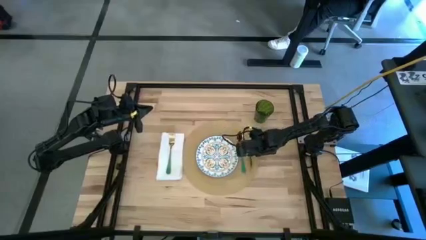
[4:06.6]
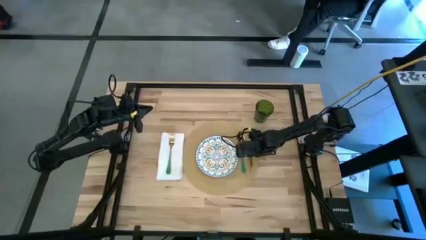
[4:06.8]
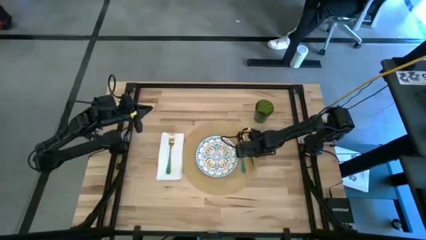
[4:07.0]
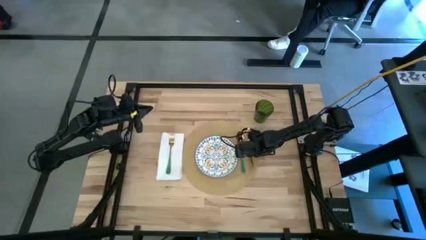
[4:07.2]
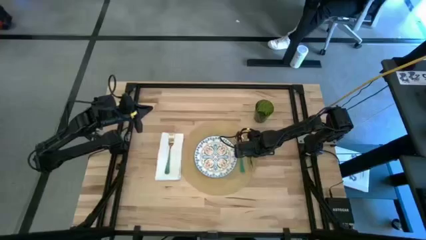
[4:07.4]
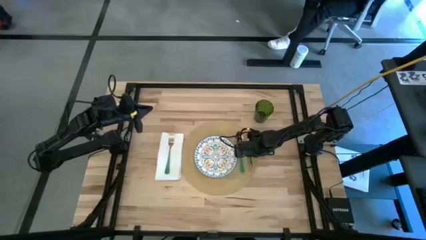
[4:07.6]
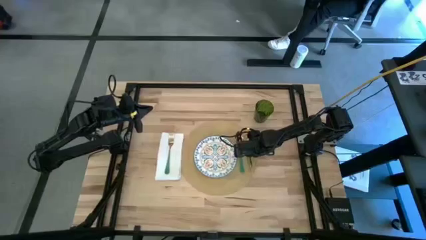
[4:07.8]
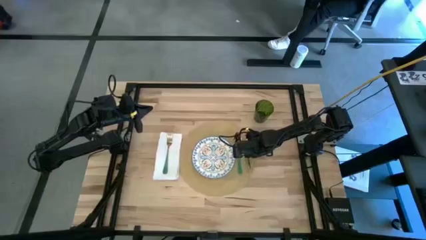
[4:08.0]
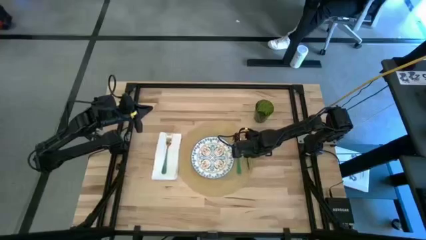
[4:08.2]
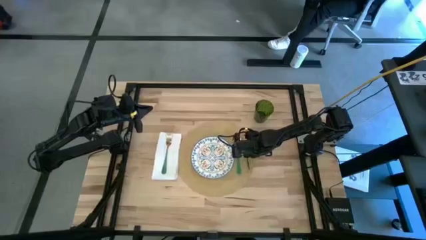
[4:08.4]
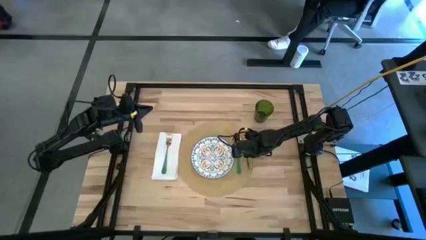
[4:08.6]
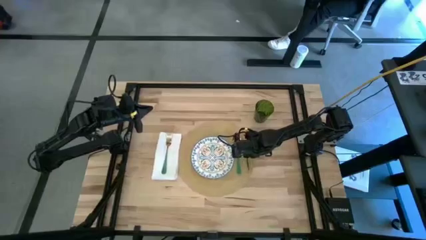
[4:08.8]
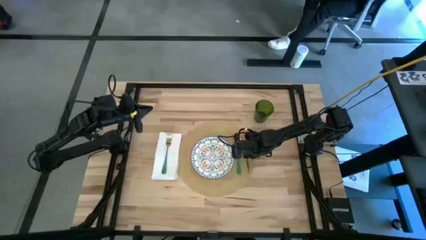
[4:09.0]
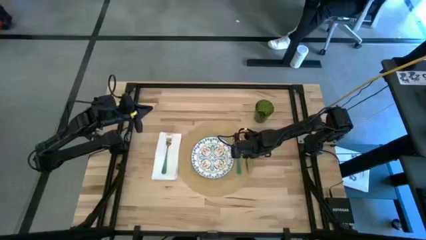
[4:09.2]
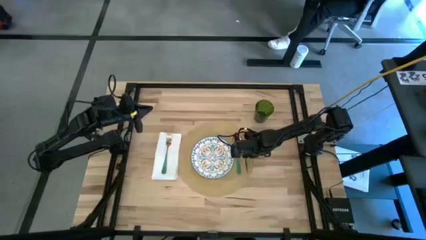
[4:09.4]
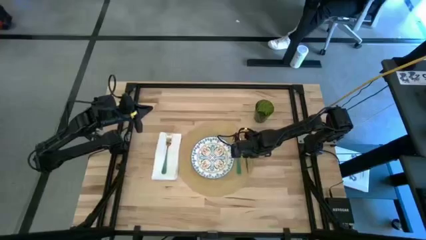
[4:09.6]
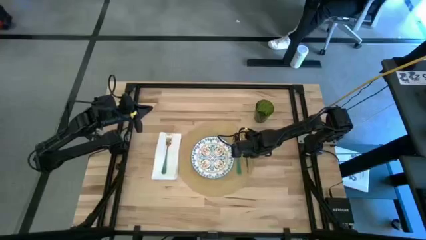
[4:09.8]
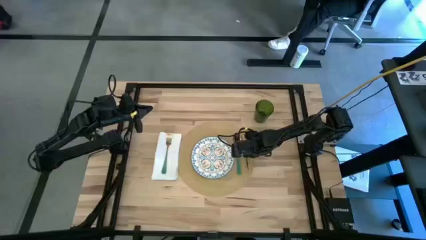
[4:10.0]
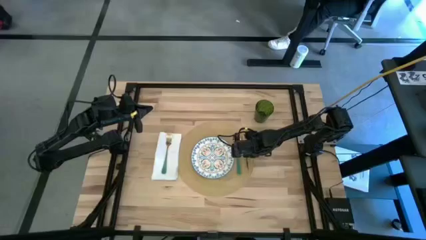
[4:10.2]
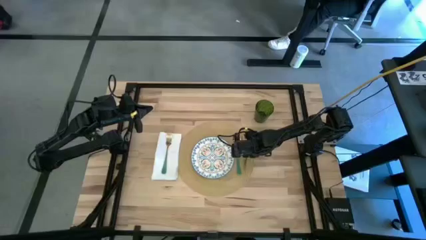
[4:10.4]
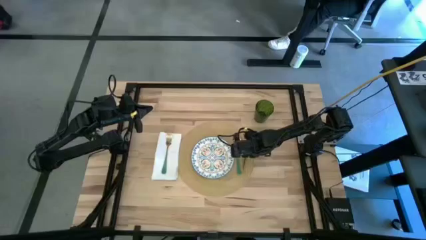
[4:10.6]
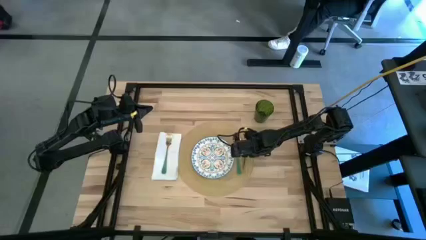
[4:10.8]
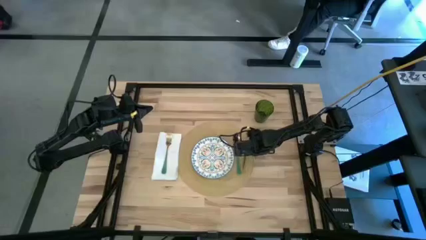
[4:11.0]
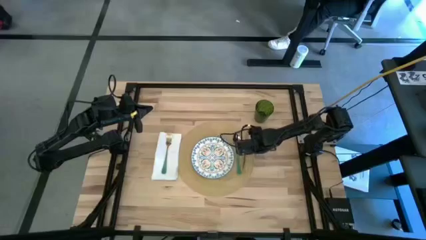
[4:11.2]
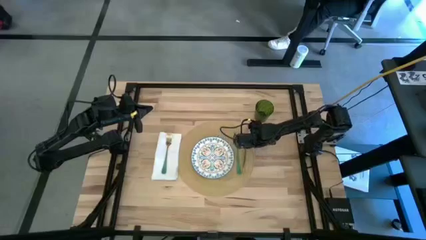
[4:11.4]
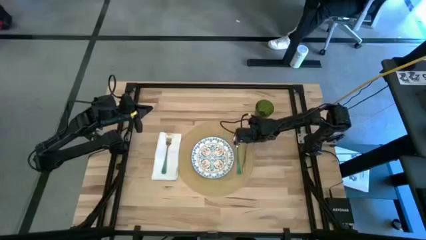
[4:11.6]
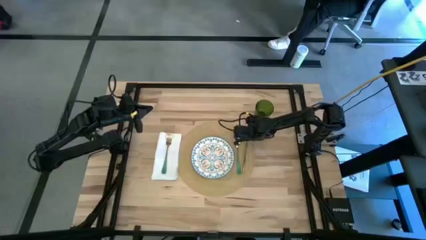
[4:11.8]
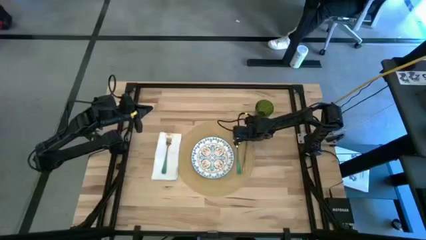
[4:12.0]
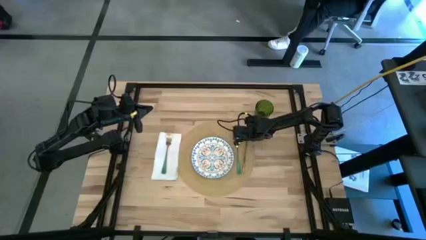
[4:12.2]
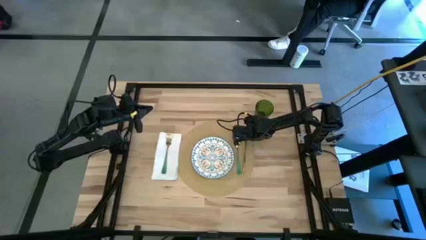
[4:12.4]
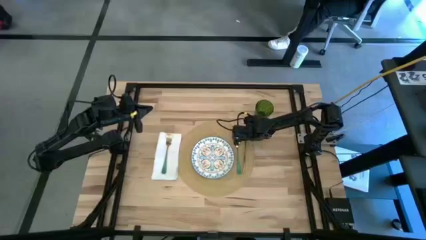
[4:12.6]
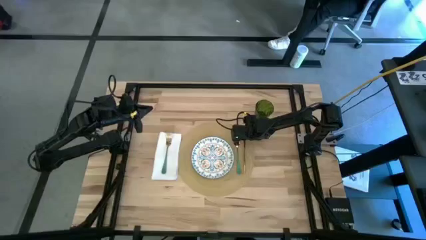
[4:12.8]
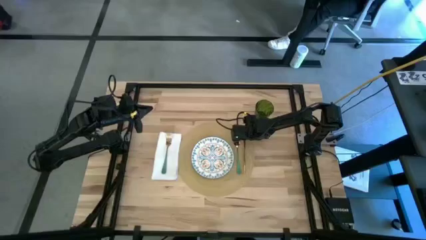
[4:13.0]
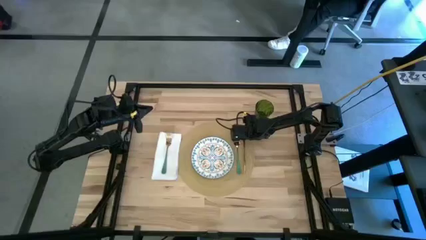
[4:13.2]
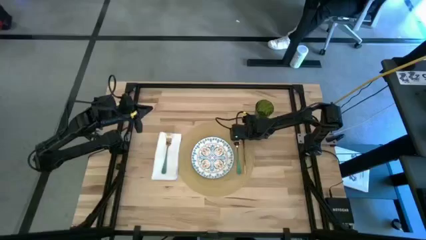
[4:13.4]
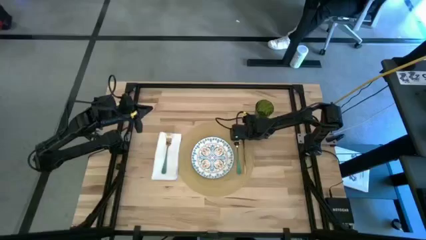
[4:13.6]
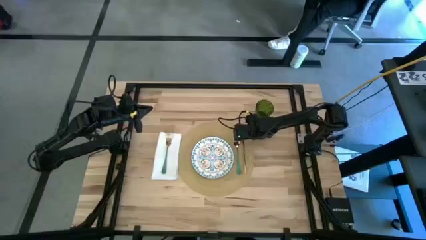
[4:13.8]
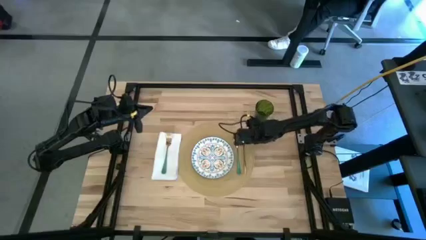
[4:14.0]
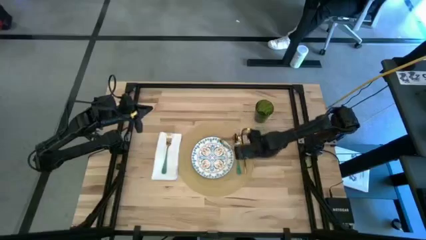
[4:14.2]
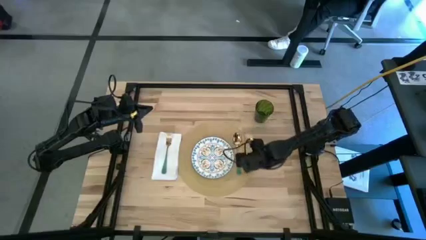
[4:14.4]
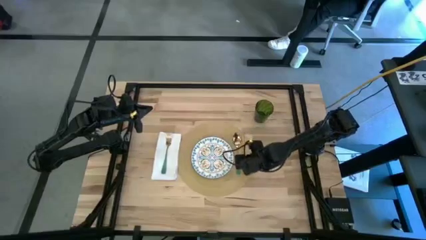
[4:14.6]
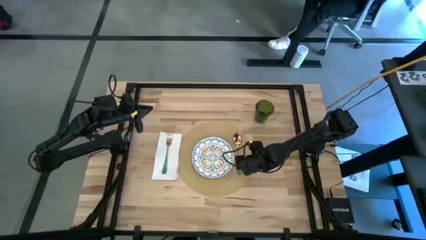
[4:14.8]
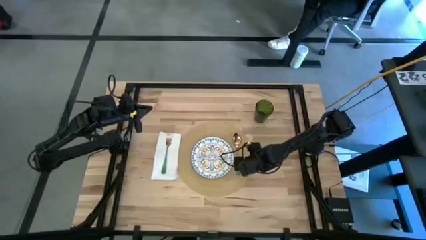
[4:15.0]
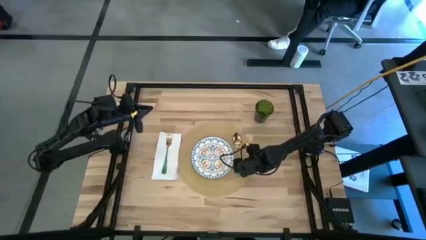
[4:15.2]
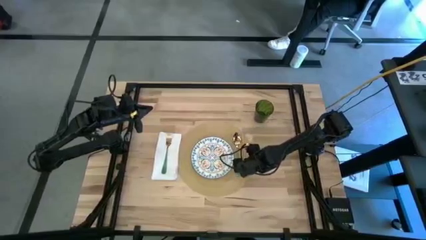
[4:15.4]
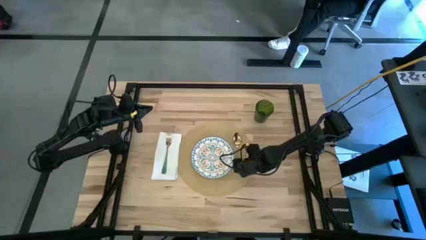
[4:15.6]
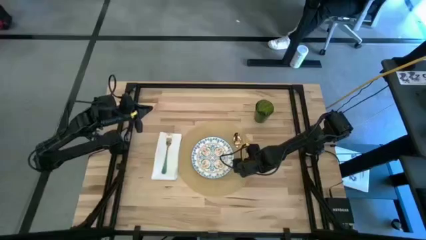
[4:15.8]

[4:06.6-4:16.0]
Task: Set table place
Put the gold table knife to the right of the green spoon on the brown place mat

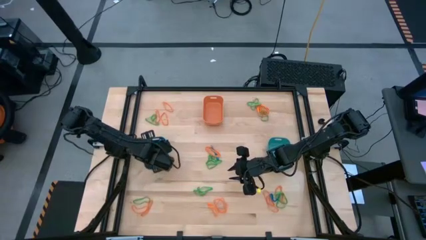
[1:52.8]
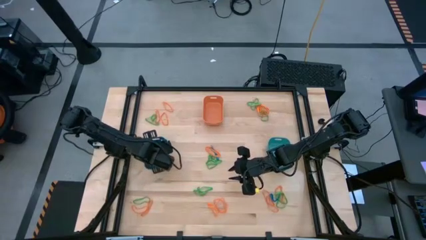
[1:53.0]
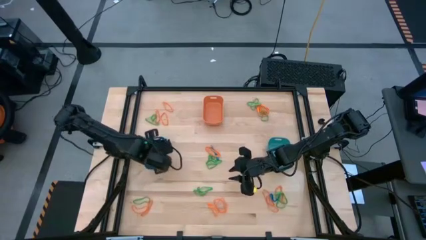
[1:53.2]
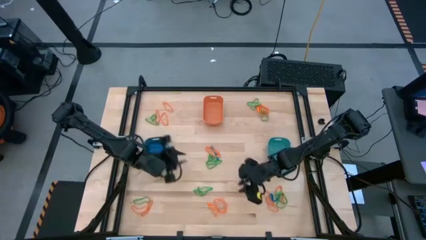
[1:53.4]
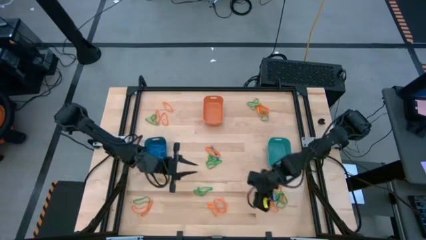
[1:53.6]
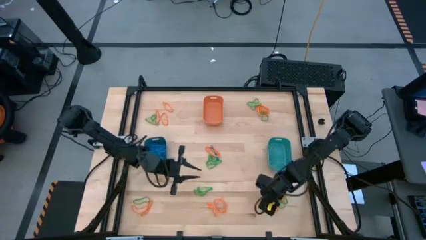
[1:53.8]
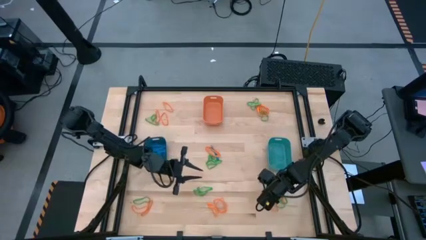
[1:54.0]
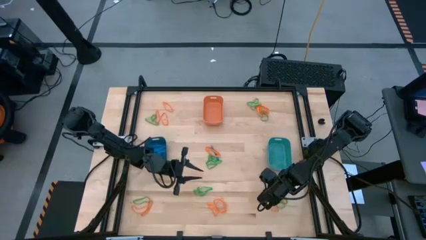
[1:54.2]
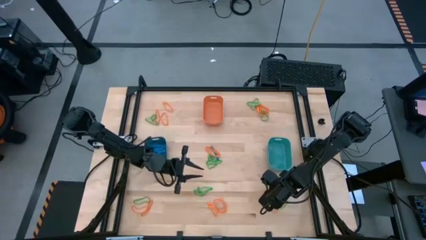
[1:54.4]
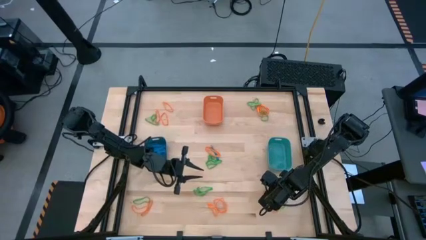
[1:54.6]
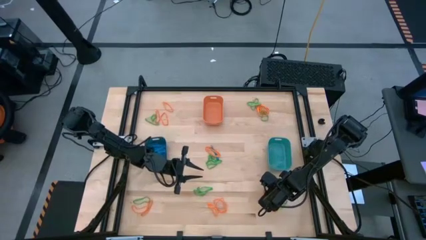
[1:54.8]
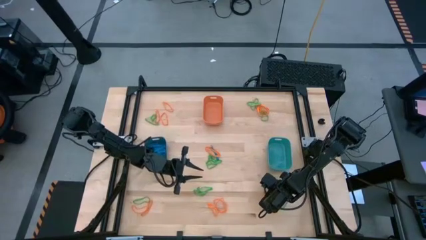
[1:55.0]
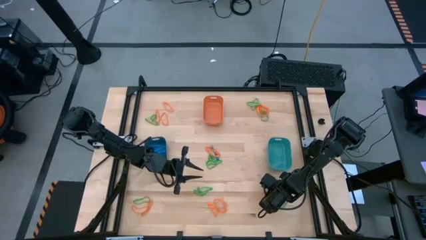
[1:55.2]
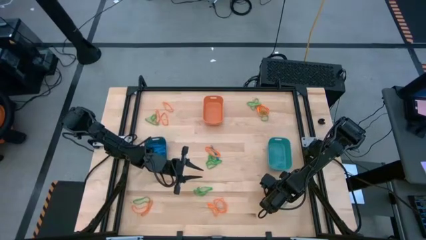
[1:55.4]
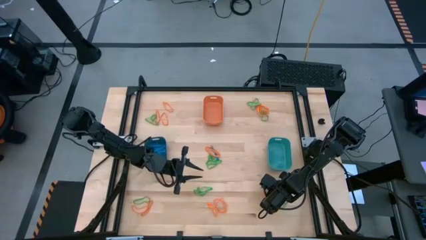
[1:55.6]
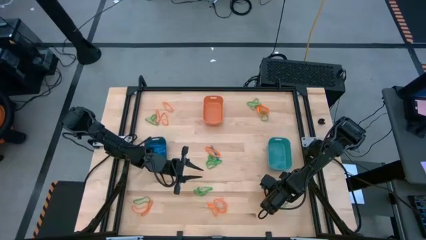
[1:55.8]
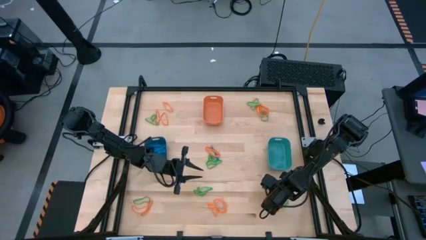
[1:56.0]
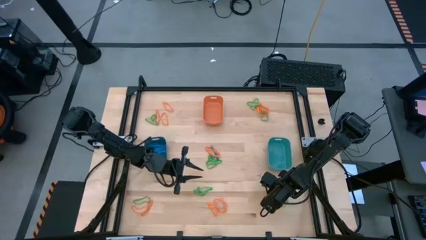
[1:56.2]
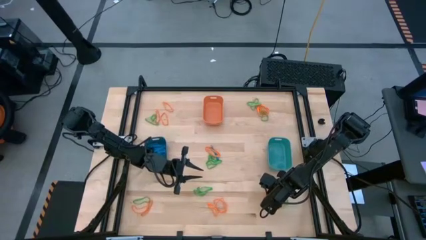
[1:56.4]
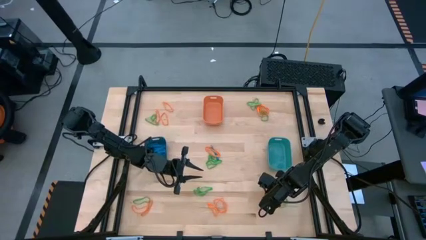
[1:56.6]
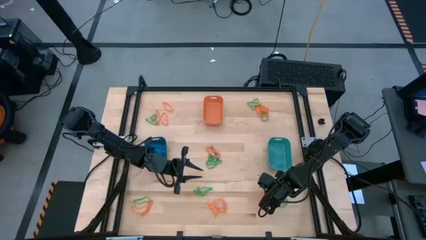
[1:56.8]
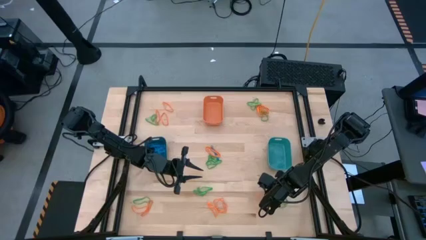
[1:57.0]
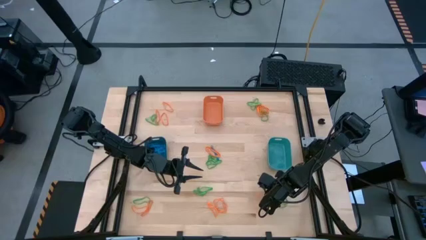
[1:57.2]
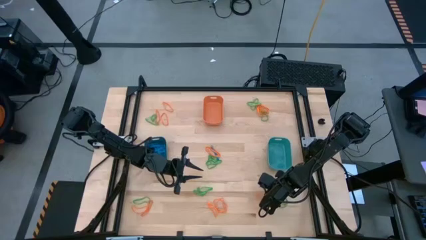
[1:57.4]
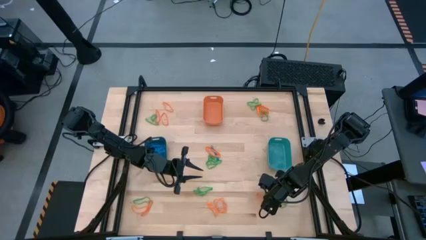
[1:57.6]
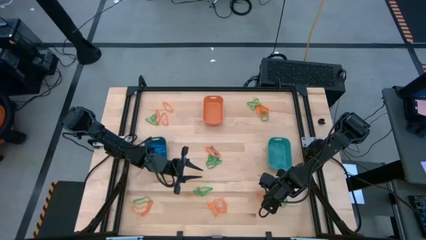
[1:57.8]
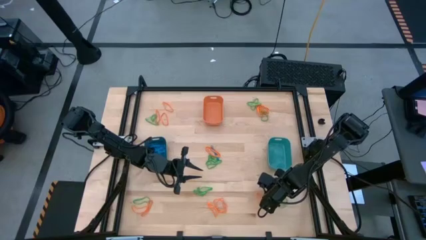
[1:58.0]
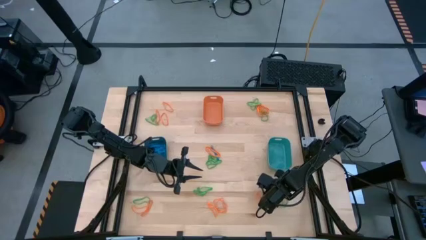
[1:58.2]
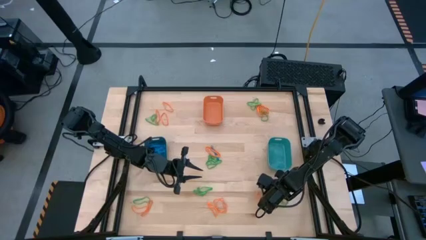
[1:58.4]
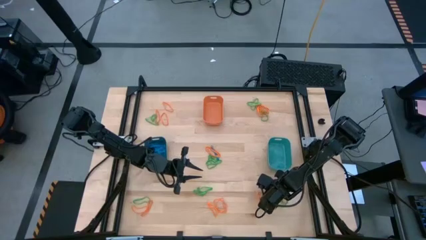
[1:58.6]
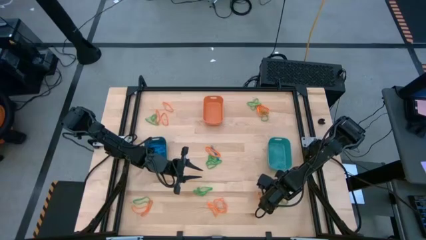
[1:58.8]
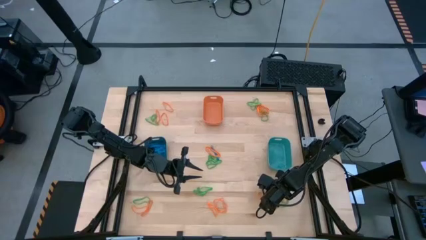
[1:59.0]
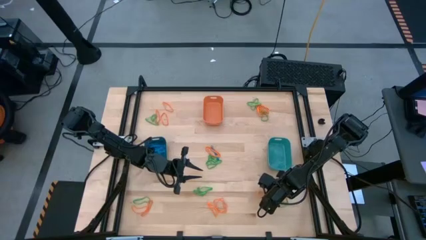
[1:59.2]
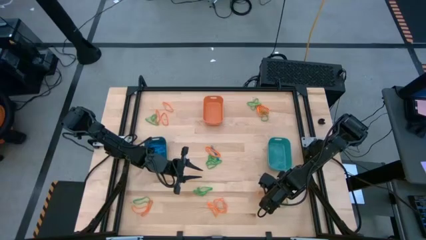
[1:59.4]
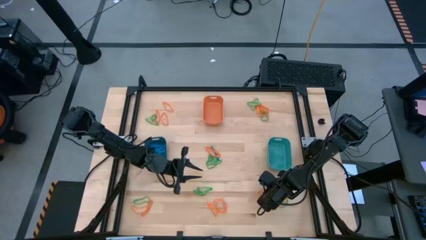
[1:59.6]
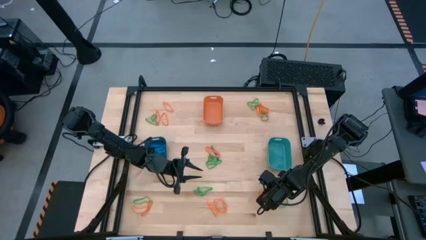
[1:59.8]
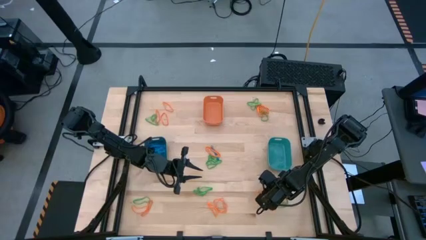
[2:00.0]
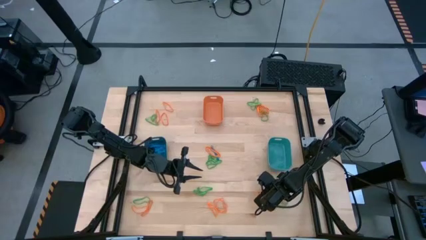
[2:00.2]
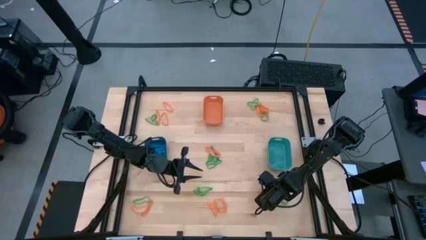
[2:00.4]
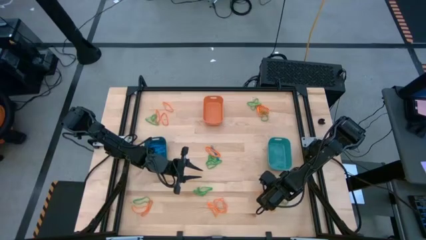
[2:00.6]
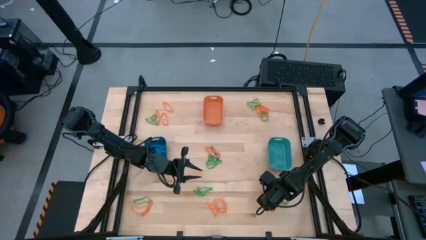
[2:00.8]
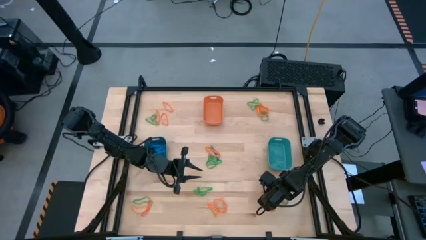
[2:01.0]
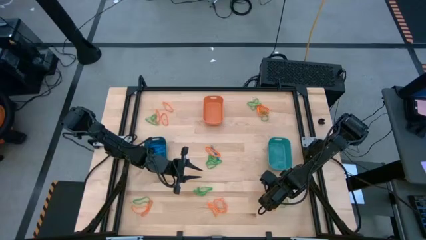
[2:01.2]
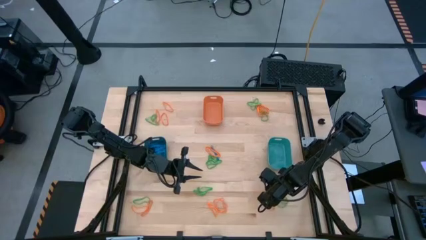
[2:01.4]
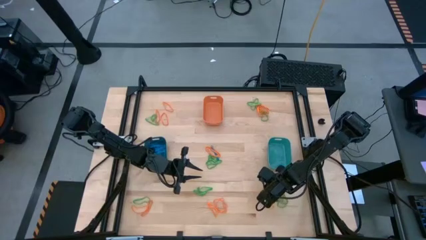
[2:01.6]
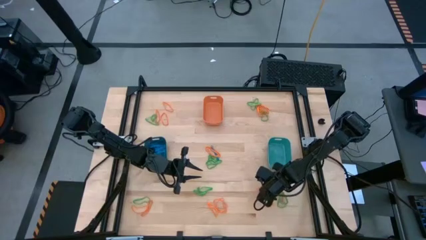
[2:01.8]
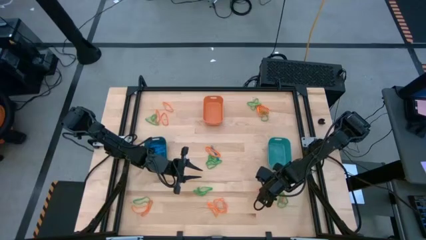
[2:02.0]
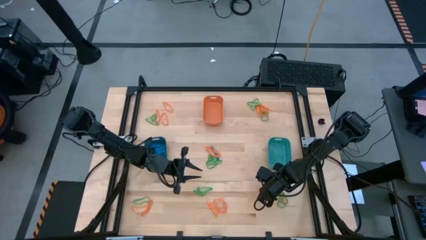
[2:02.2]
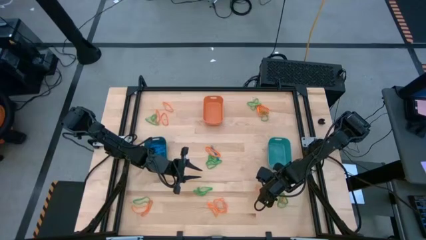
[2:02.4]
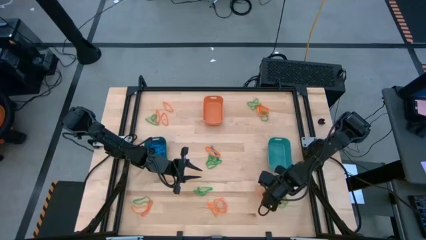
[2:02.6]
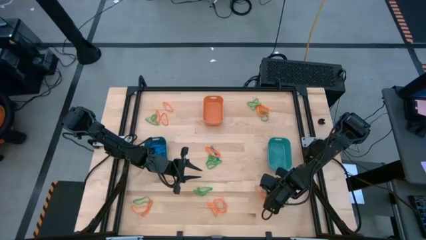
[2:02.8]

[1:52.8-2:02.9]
Task: Sort rubber bands into baskets
Put the blue rubber band into the blue bin
